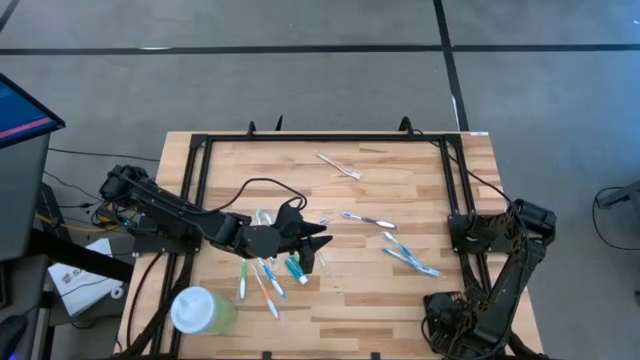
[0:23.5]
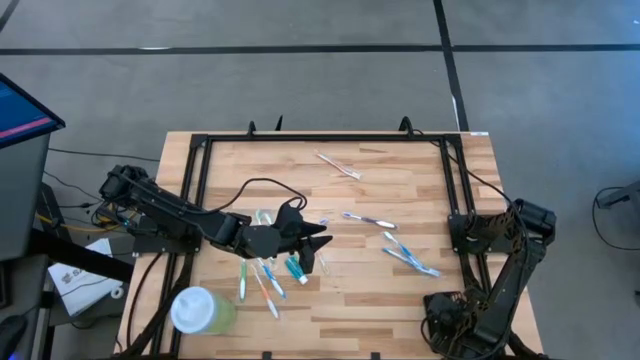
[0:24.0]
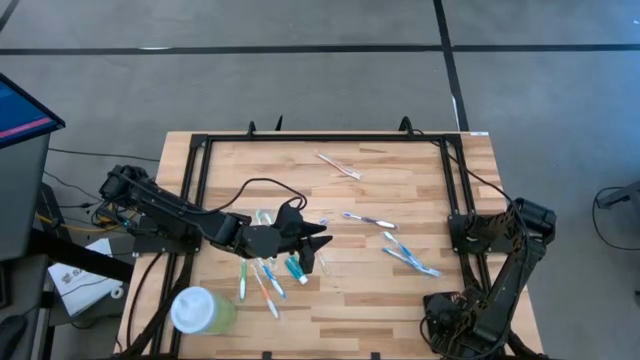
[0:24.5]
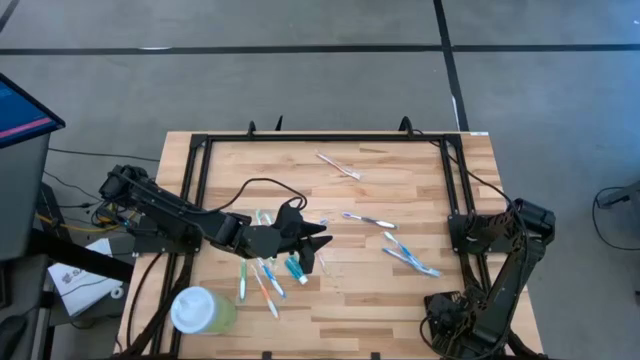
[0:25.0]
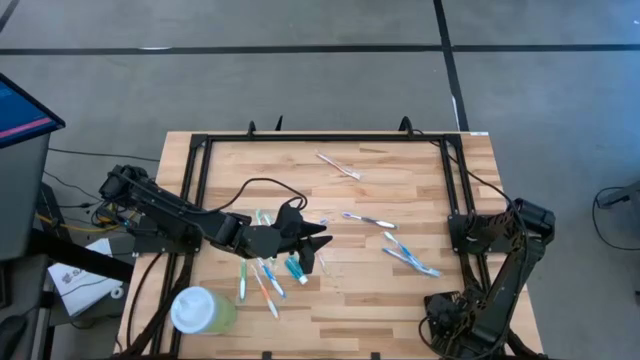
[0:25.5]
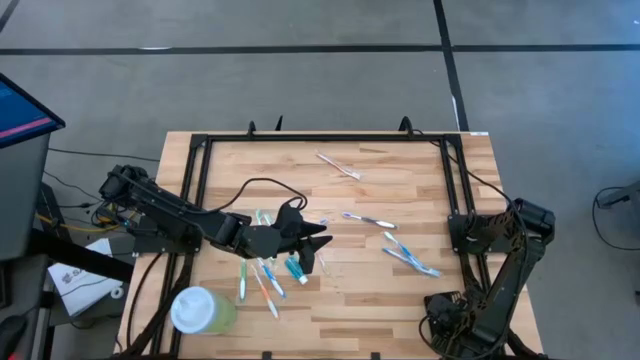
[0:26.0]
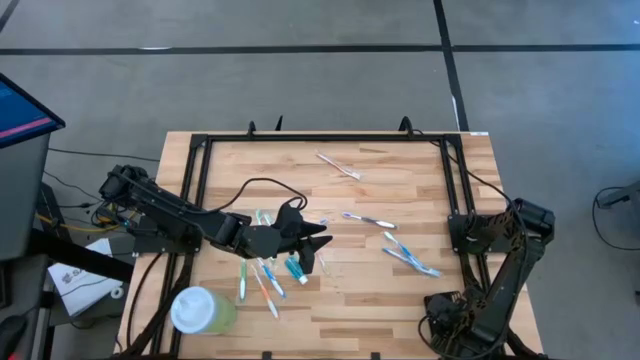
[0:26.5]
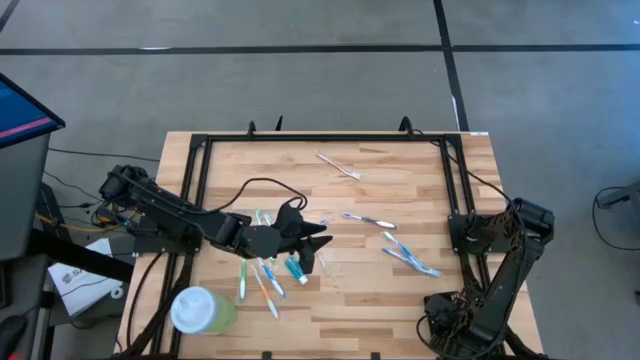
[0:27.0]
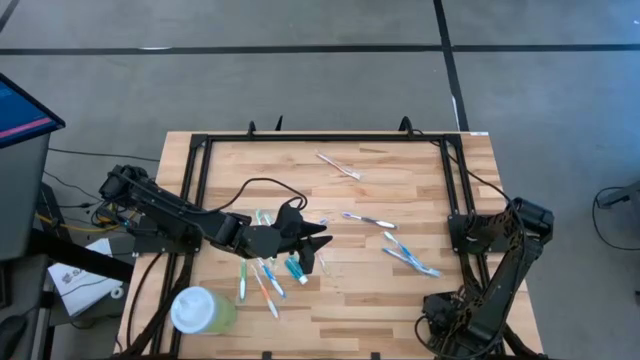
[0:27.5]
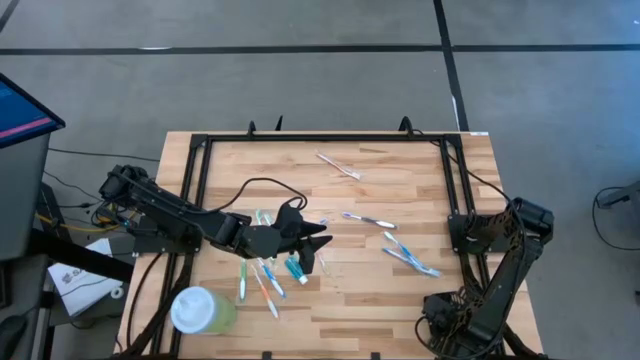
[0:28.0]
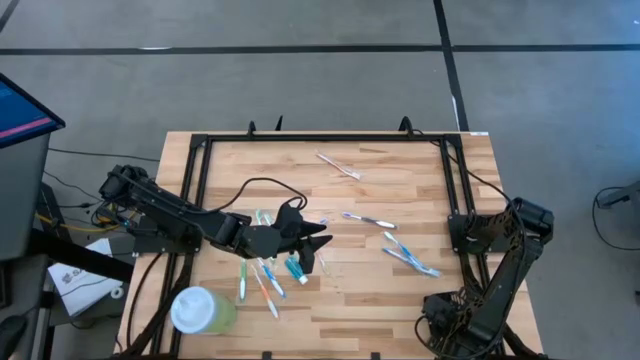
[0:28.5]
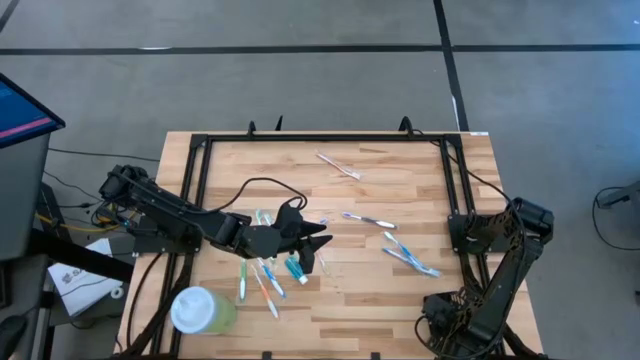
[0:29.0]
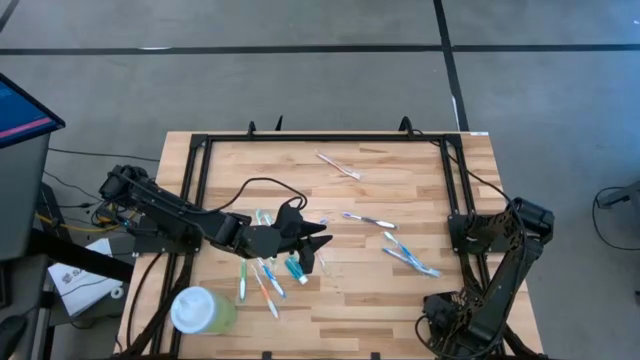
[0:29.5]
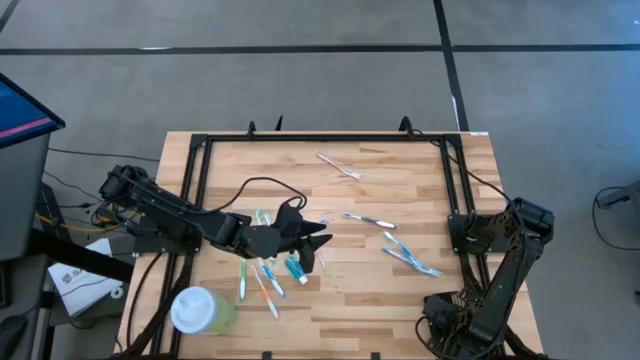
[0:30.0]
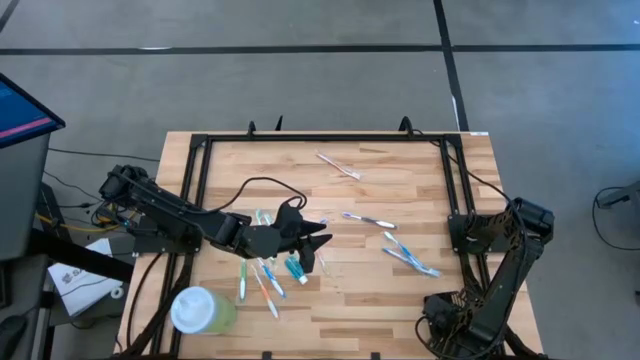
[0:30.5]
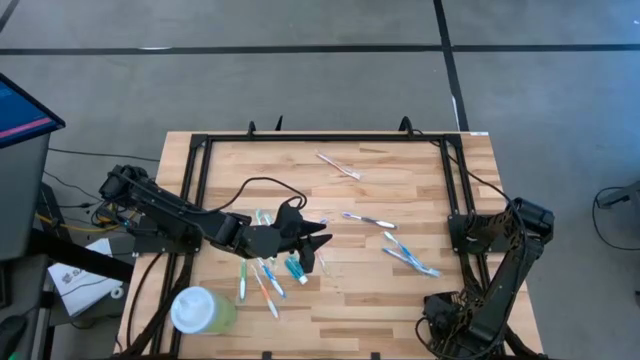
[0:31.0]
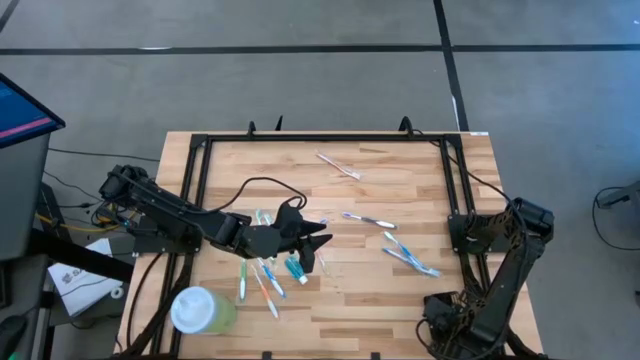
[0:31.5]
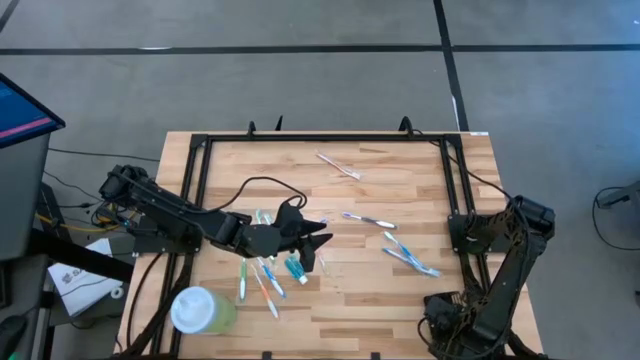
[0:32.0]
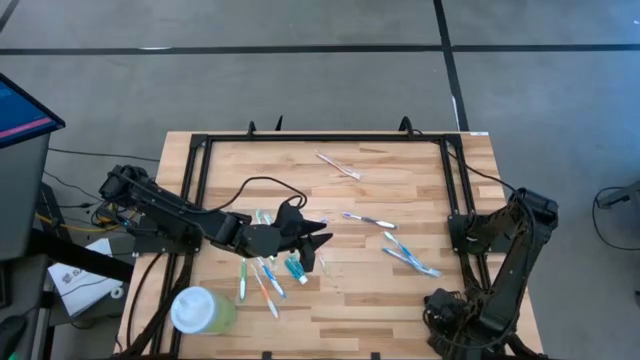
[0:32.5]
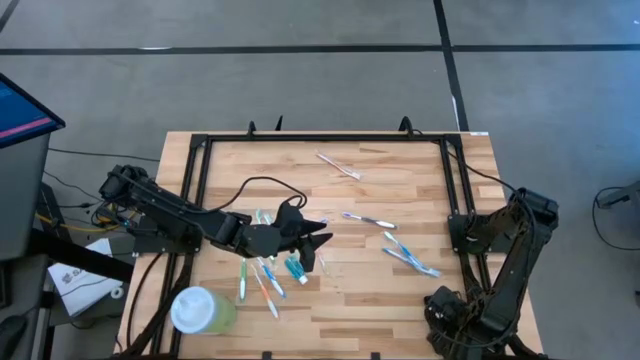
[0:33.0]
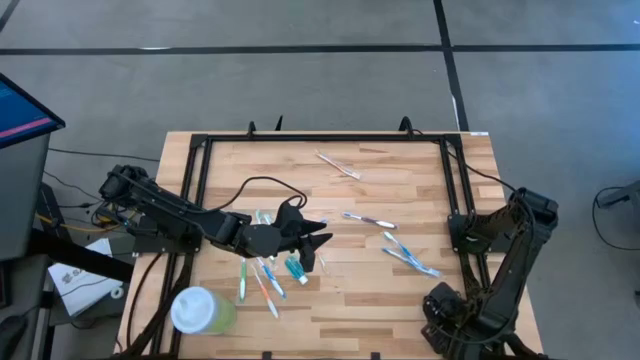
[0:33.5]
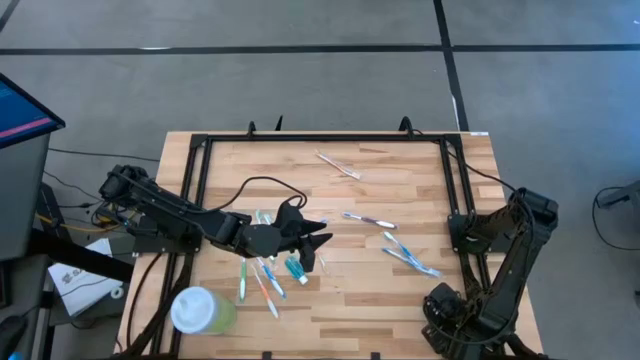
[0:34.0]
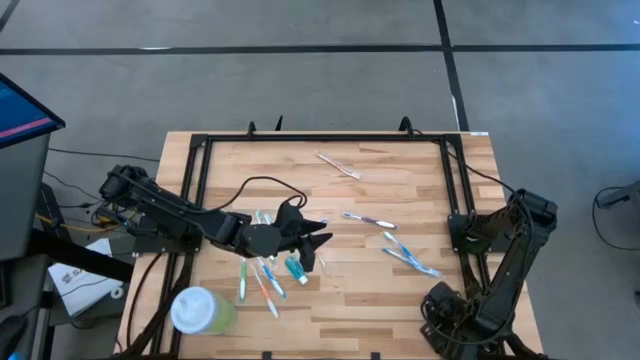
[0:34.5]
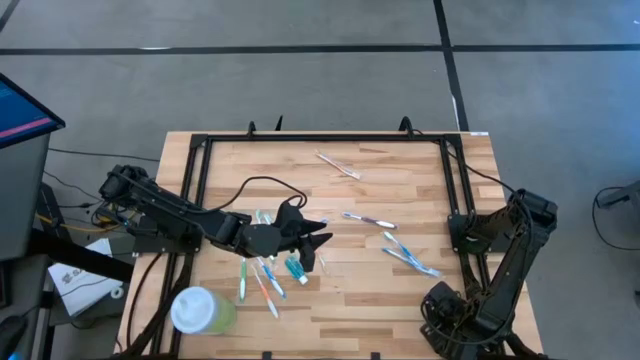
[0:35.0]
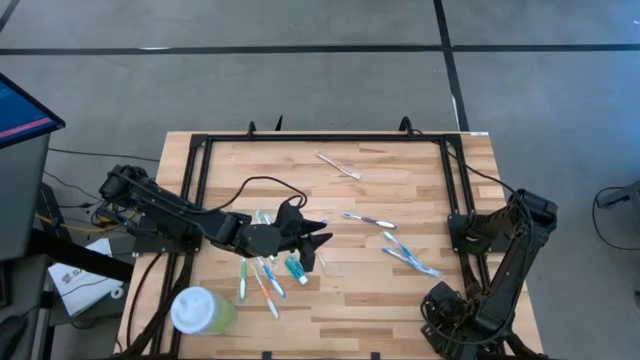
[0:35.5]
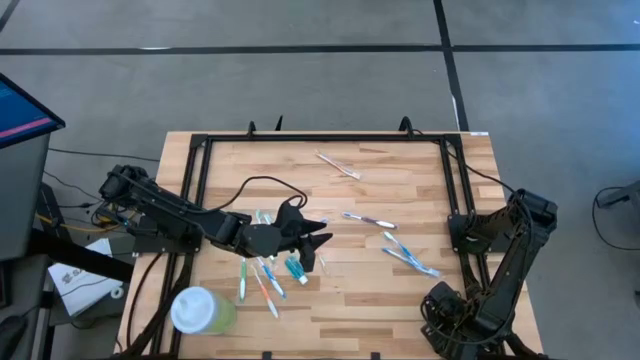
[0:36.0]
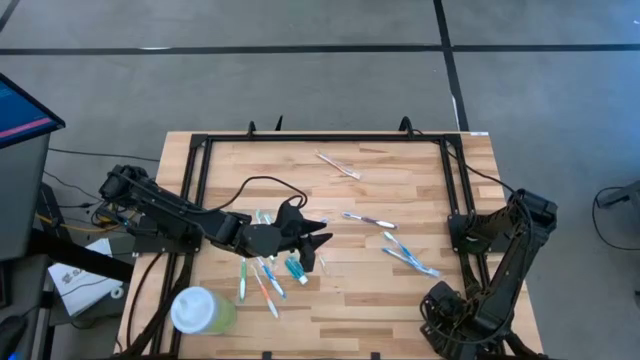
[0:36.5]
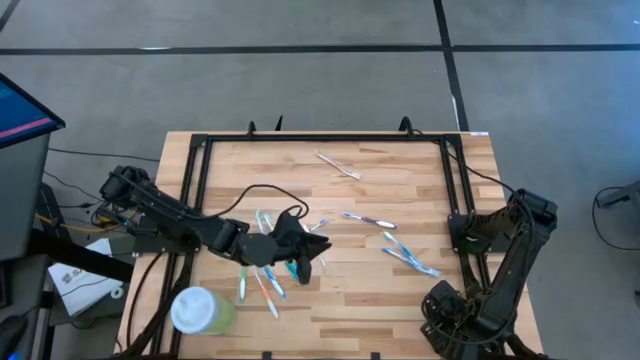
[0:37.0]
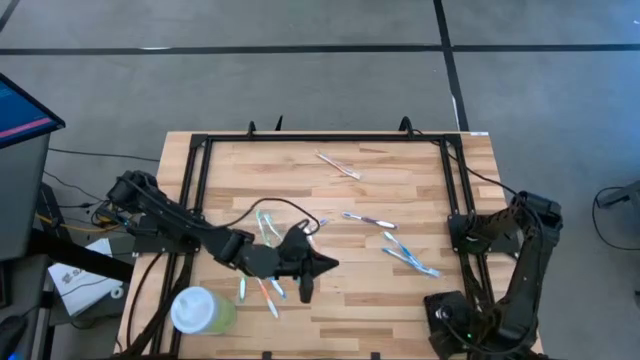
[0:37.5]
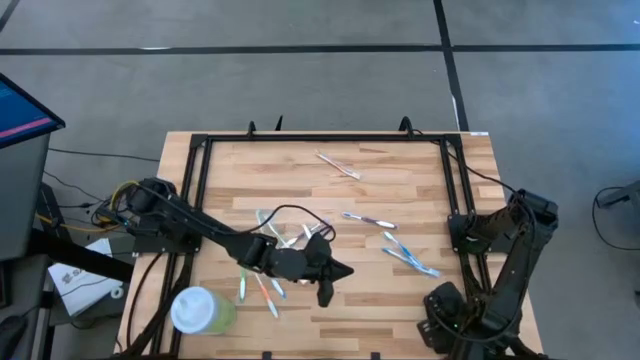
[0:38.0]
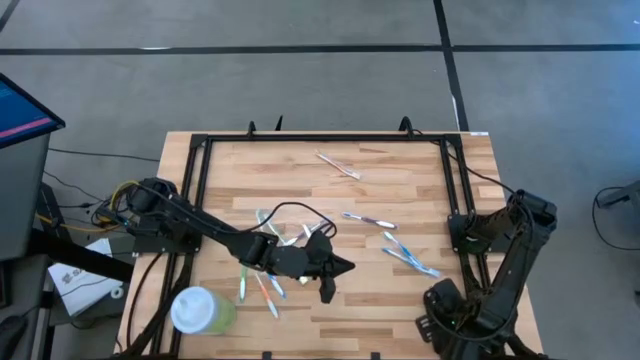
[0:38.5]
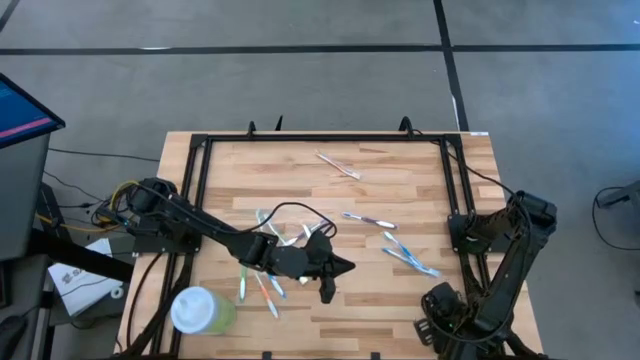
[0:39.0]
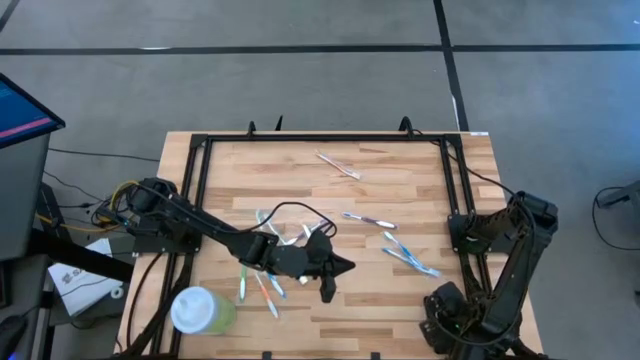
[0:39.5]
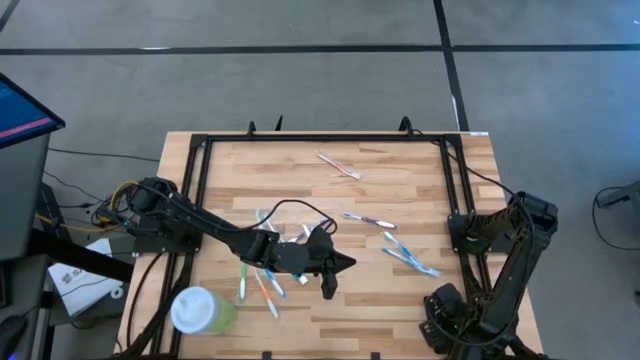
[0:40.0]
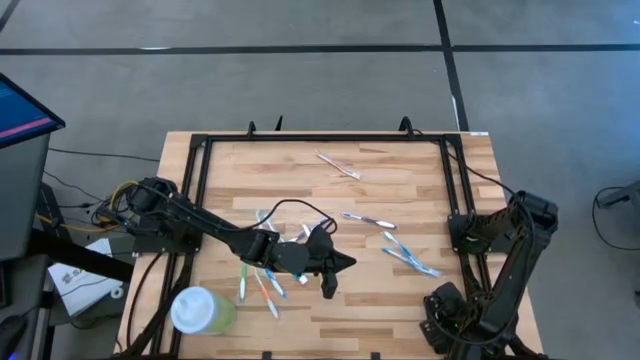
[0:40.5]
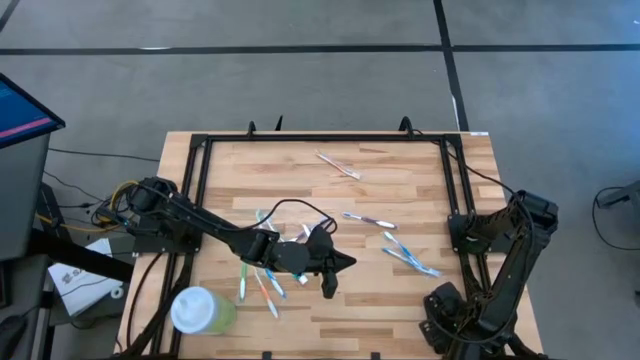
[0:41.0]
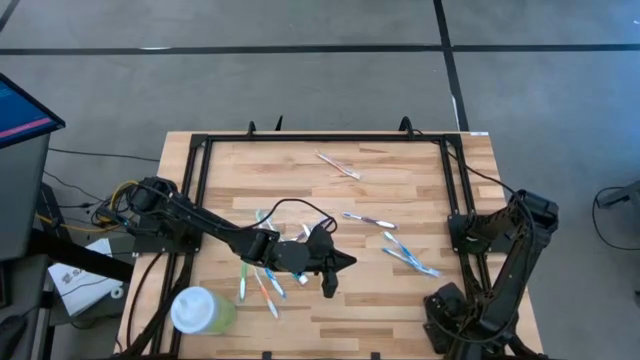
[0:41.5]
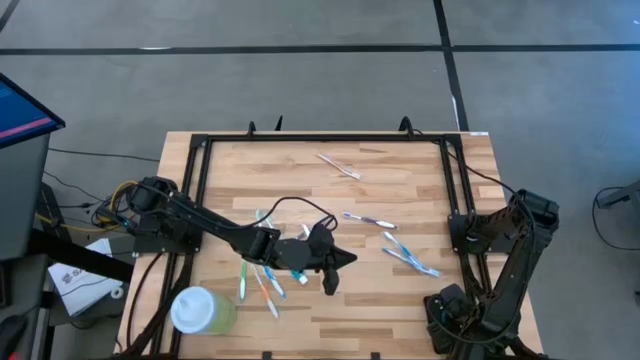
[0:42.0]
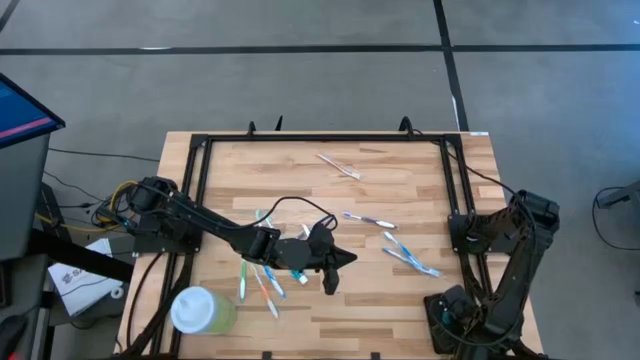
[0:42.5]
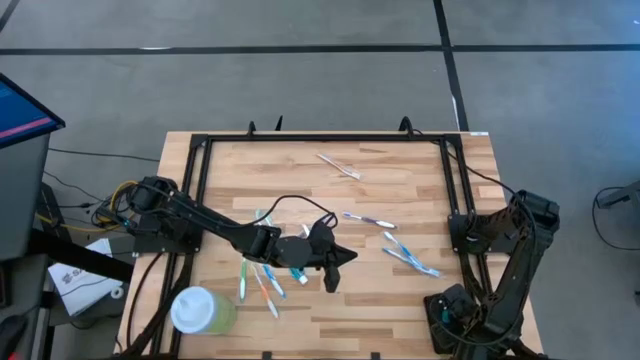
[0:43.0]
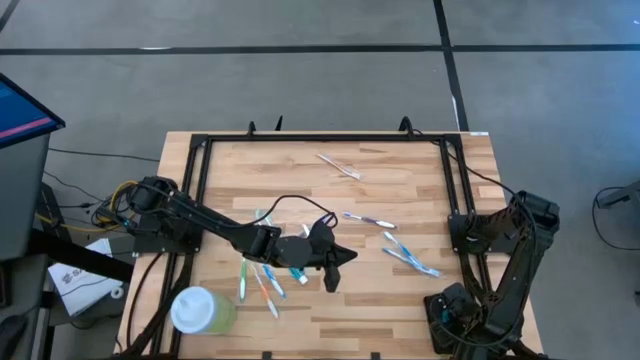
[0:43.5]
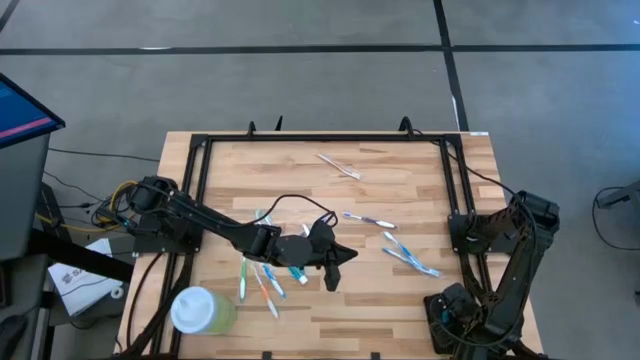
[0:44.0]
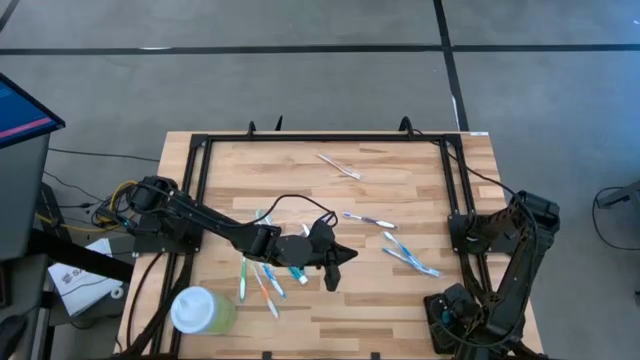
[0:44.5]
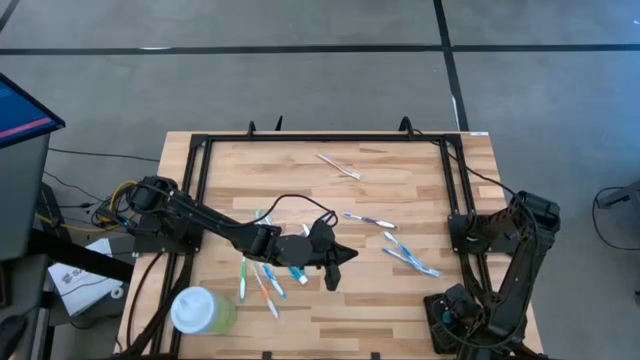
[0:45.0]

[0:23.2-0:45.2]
Task: Pick & Place toothbrushing station
Put the right blue mouthwash bottle into the black organizer
